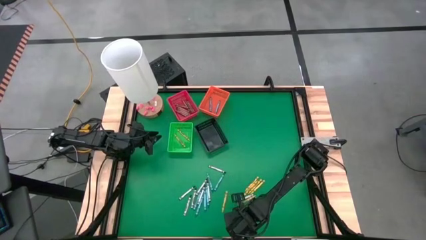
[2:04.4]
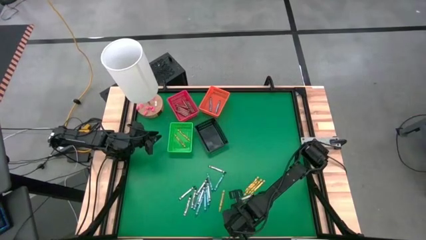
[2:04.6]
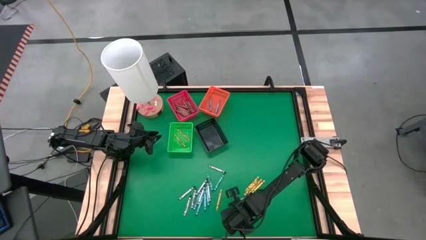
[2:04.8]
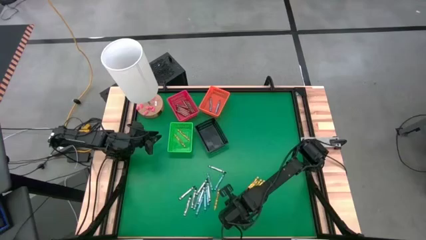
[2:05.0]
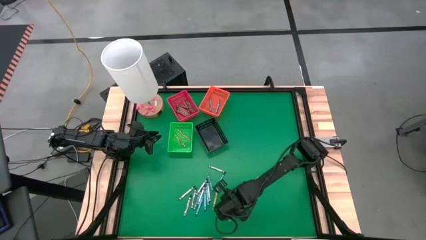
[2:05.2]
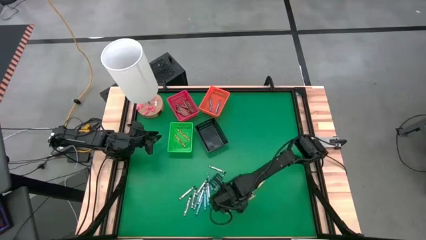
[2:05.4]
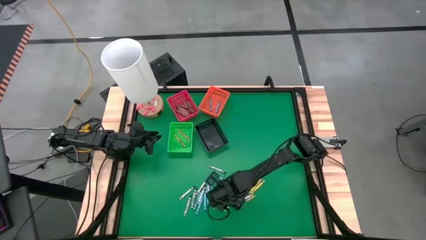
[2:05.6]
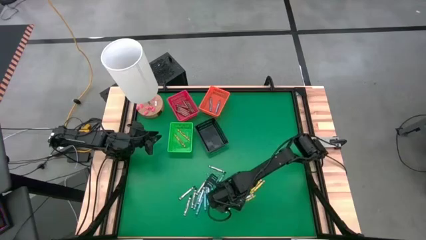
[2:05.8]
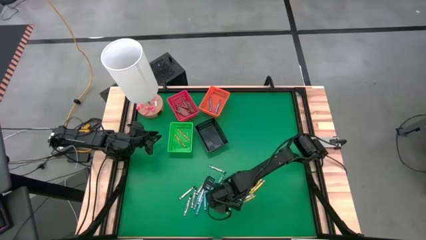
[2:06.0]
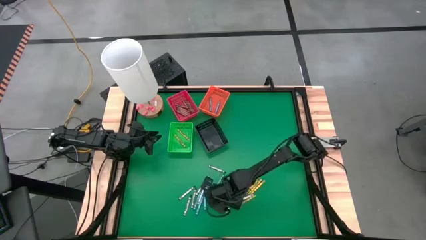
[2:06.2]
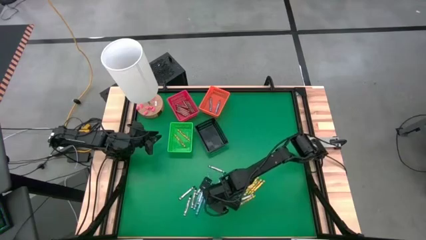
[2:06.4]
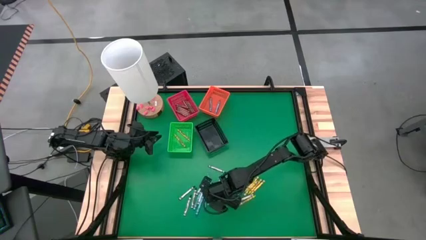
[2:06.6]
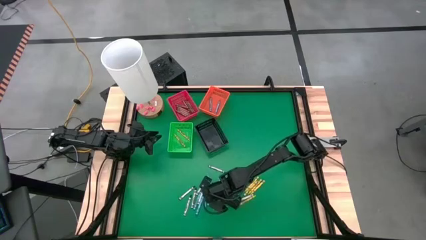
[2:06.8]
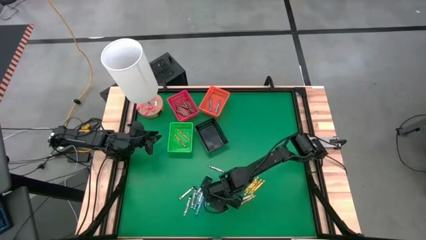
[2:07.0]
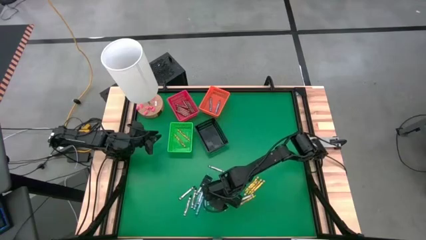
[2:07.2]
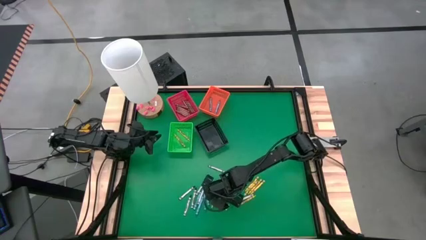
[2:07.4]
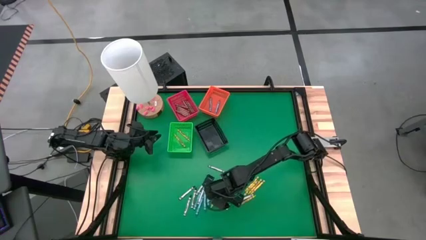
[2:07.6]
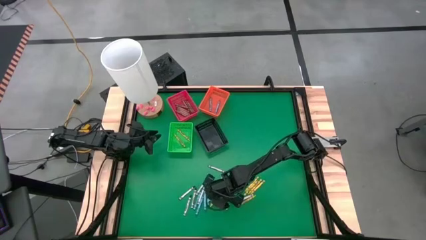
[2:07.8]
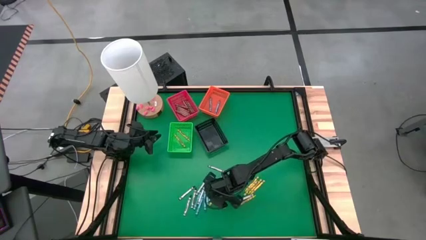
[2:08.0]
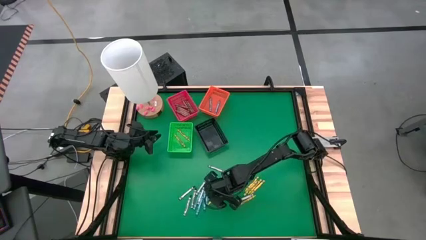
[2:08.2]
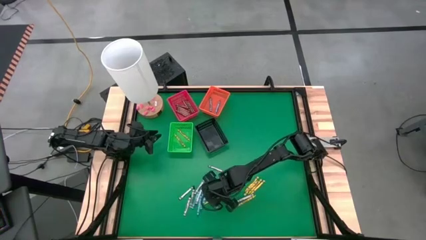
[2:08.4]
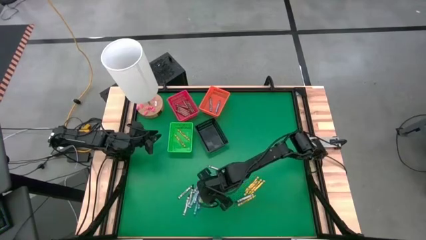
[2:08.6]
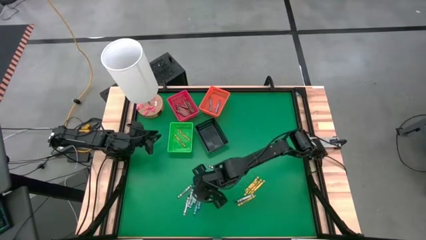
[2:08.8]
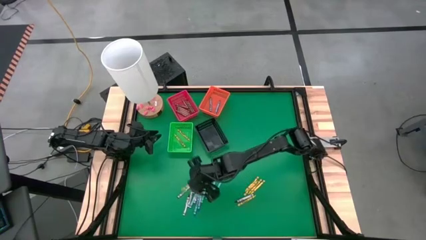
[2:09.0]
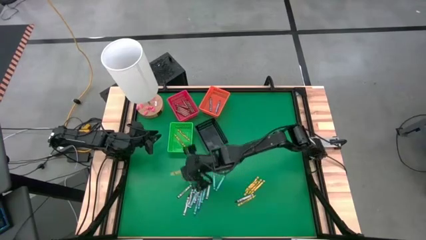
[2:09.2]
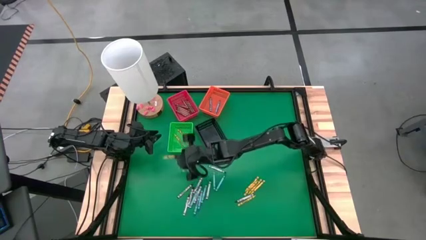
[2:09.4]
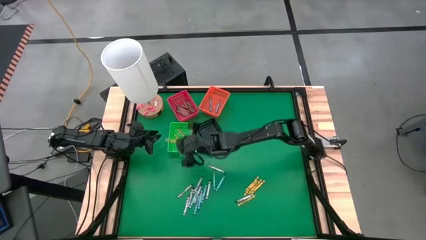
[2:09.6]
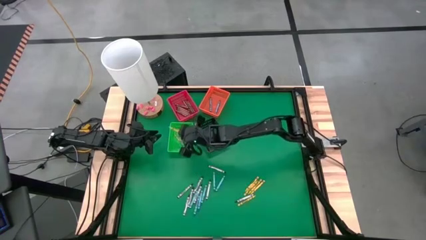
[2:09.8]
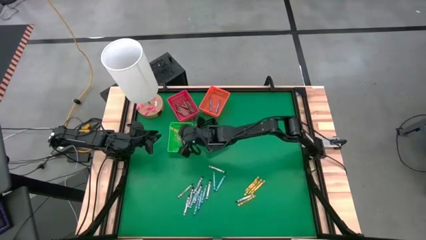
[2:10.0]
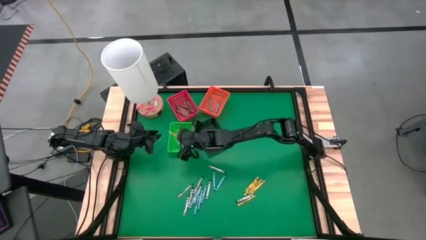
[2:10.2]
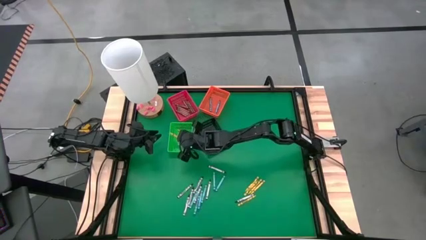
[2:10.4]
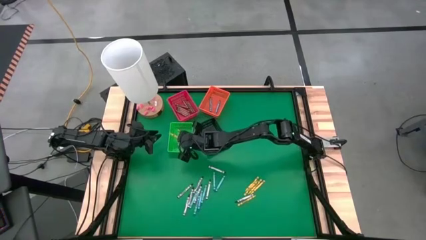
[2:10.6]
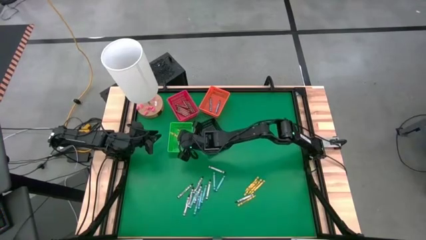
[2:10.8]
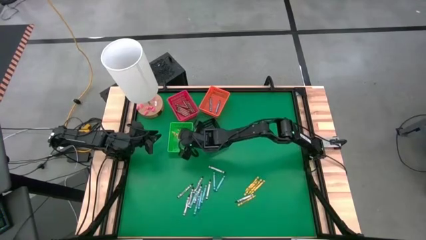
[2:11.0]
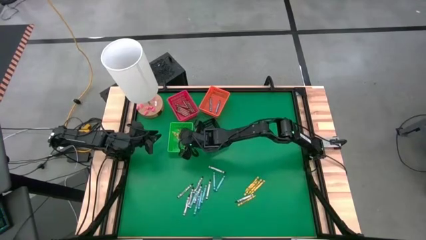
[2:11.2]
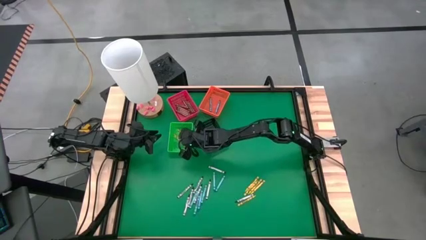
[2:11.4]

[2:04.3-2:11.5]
Task: Sort crayons
Put the yellow crayon into the green bin

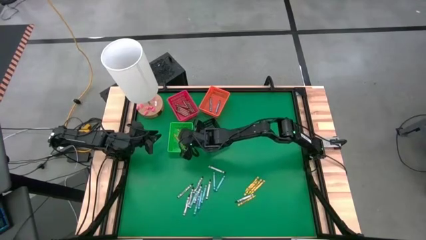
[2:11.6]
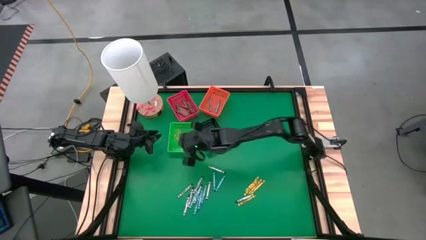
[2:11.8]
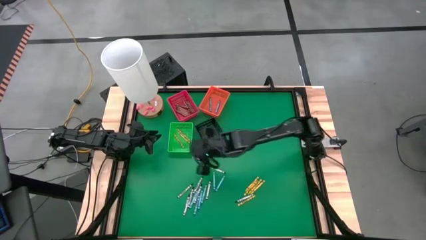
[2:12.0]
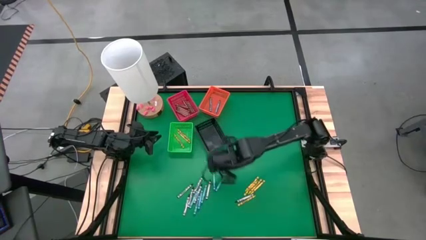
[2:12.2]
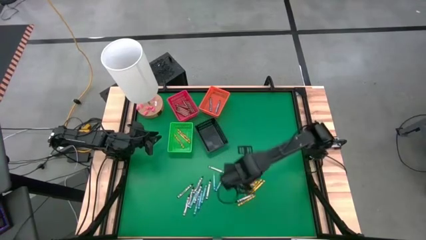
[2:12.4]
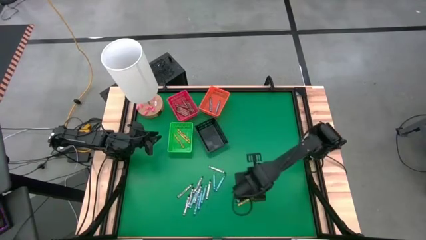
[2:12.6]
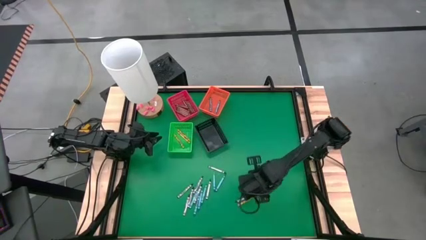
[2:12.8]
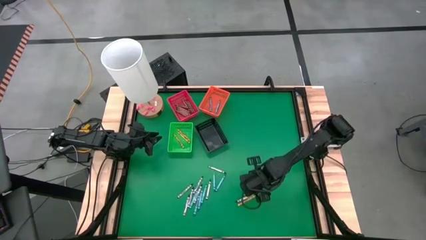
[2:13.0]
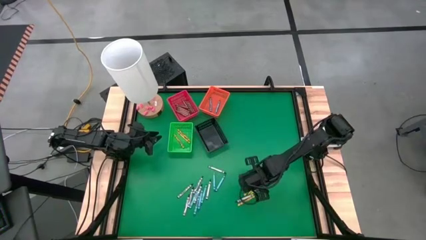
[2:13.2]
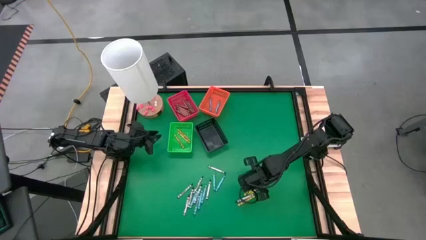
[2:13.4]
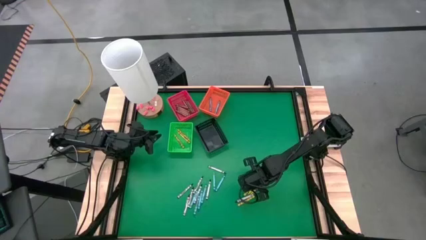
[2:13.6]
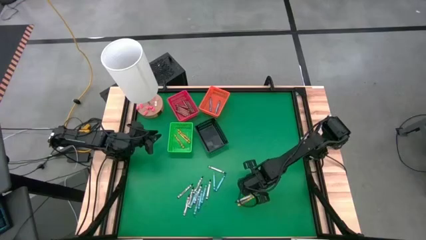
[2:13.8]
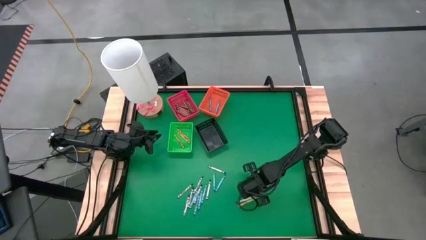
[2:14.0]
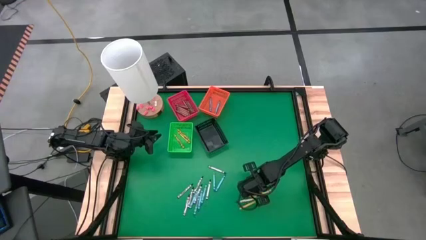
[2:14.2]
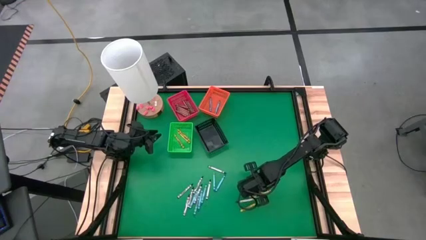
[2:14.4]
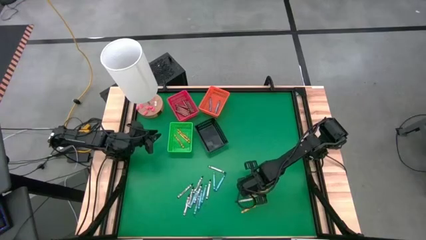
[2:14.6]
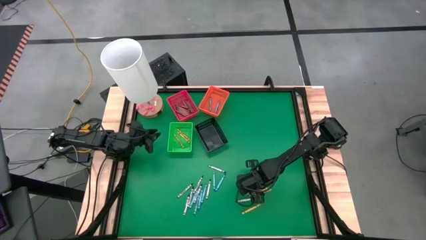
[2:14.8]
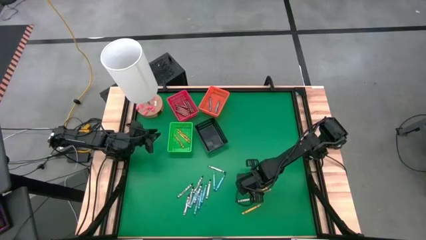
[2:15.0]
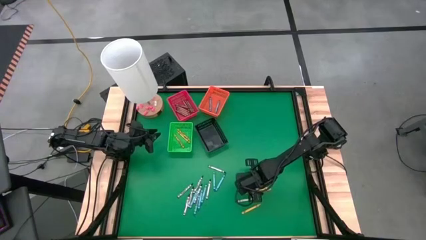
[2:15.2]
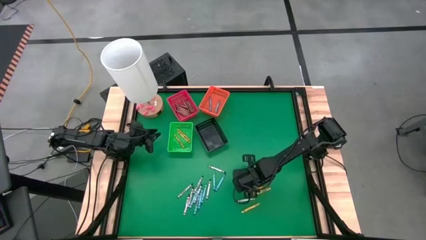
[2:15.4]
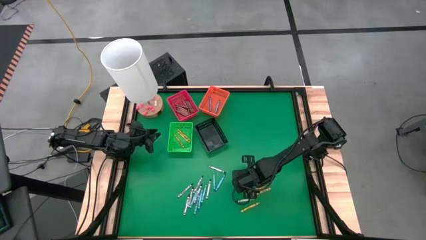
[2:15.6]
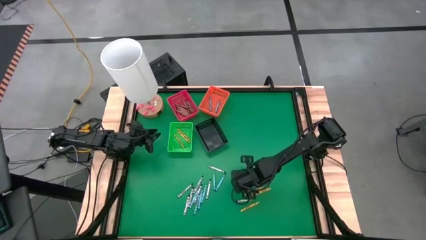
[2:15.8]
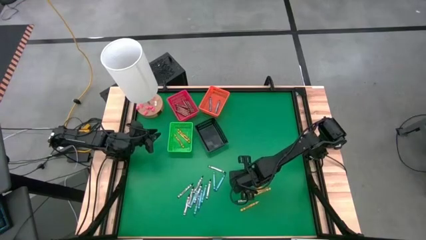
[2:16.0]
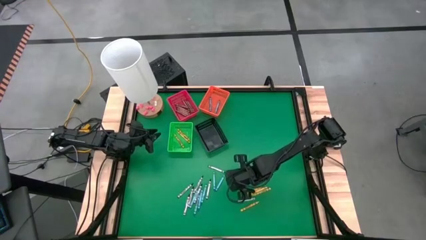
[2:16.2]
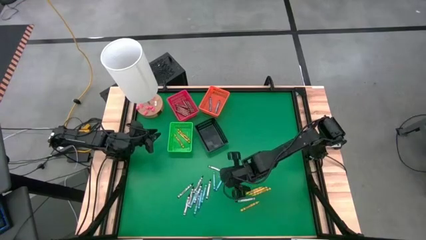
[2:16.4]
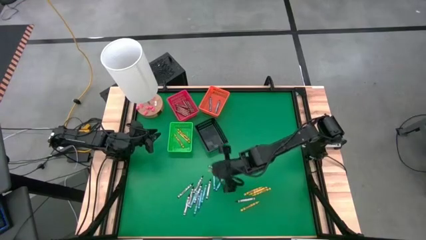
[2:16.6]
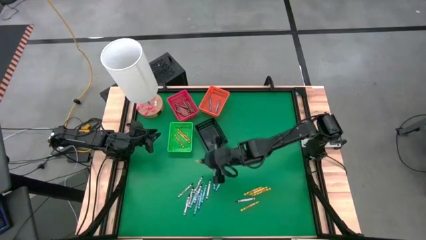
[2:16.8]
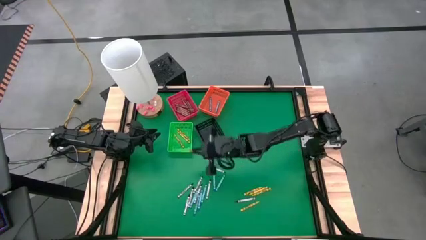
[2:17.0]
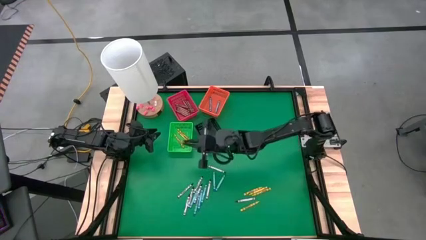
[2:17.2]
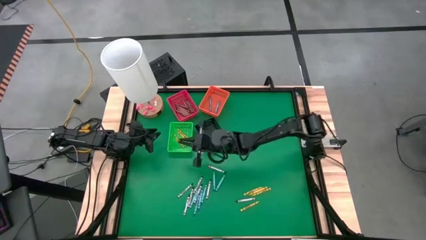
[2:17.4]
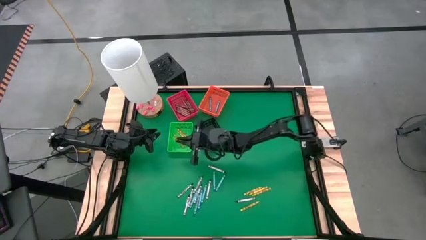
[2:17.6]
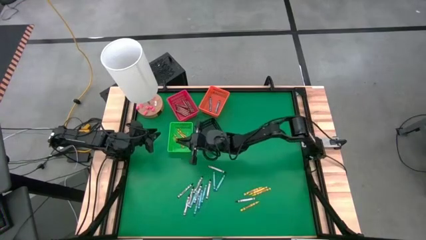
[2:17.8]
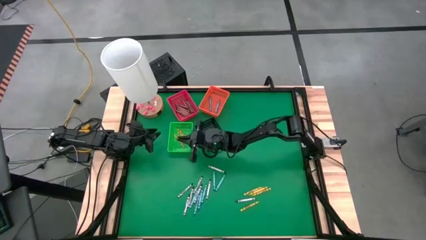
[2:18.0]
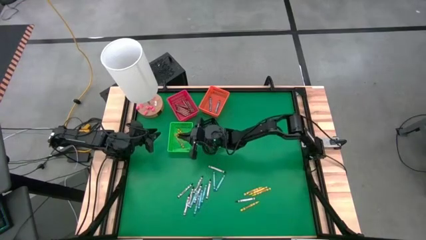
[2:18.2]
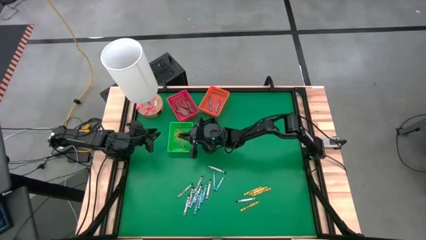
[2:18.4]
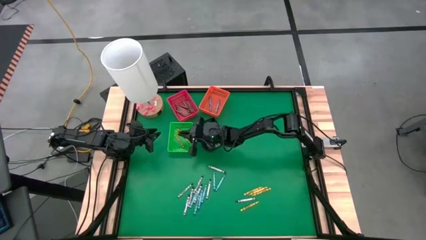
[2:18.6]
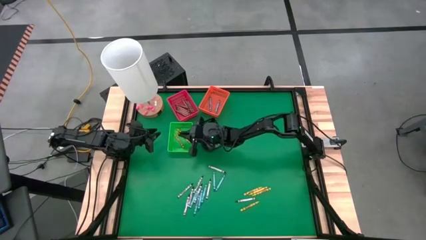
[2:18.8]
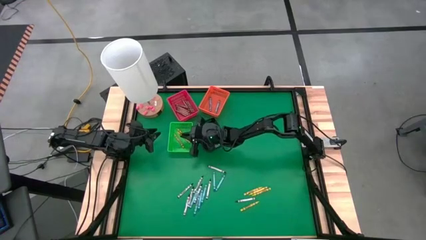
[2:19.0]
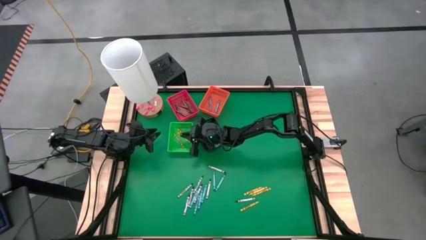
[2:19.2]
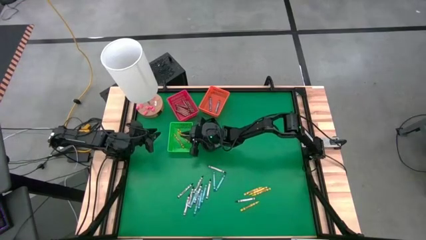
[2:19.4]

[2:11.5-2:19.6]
Put the yellow crayon into the green bin
